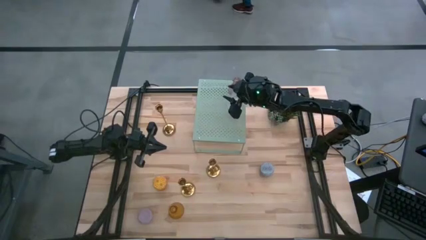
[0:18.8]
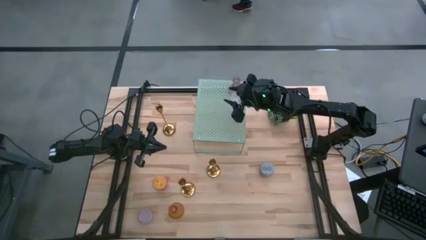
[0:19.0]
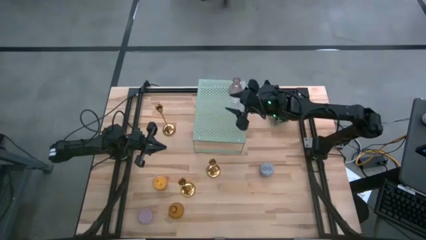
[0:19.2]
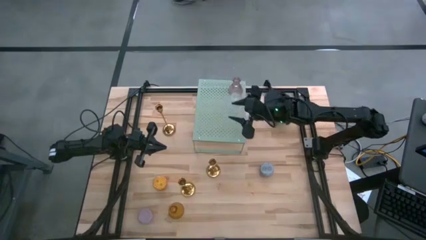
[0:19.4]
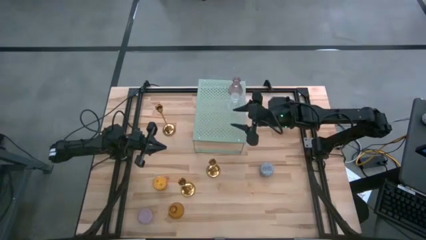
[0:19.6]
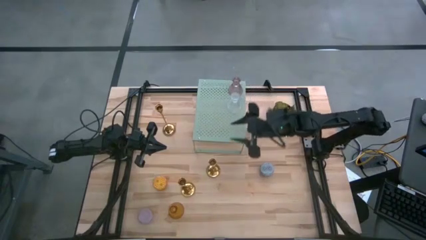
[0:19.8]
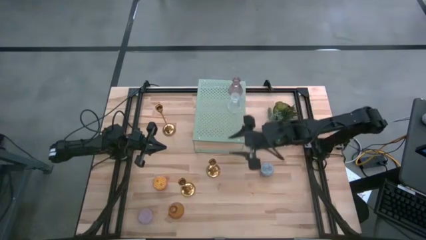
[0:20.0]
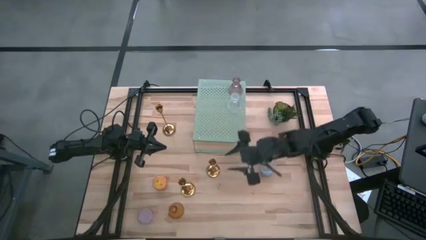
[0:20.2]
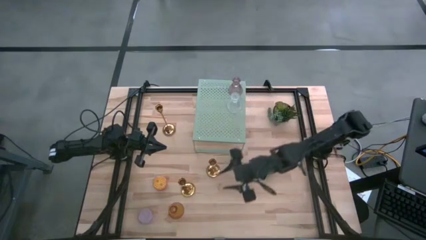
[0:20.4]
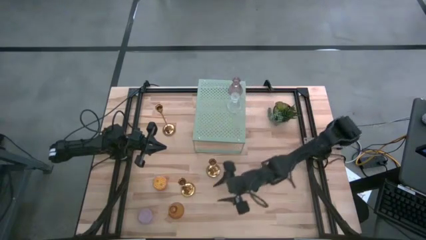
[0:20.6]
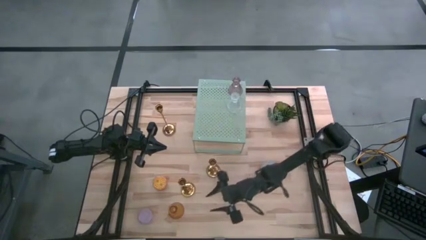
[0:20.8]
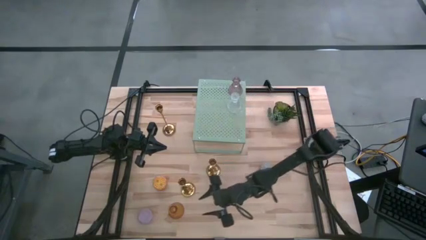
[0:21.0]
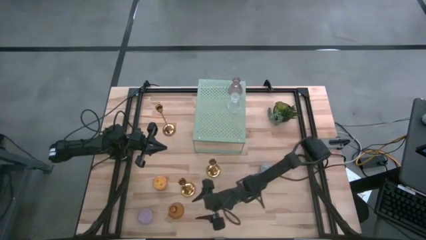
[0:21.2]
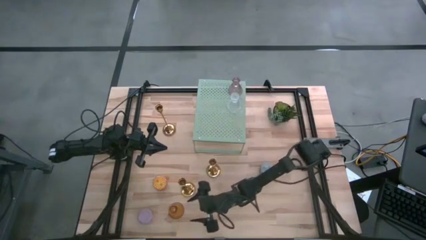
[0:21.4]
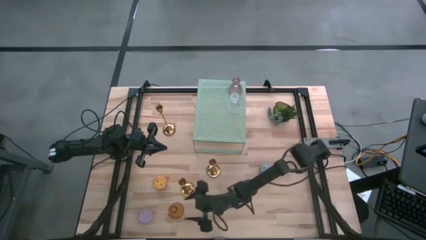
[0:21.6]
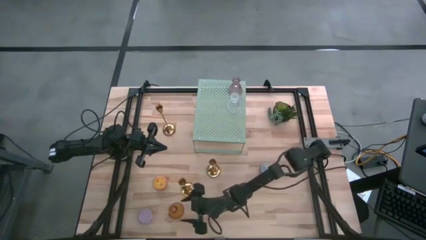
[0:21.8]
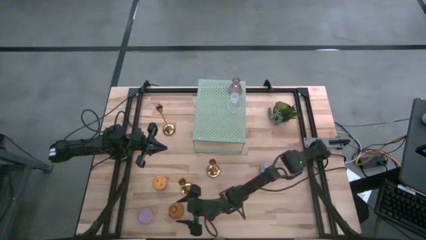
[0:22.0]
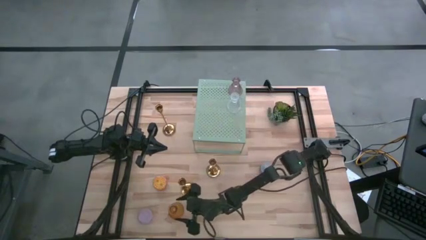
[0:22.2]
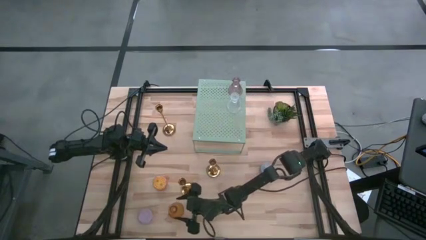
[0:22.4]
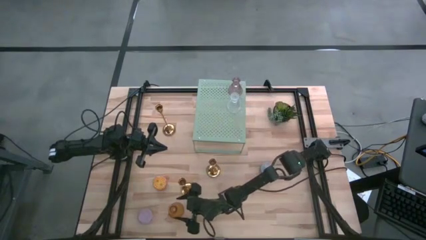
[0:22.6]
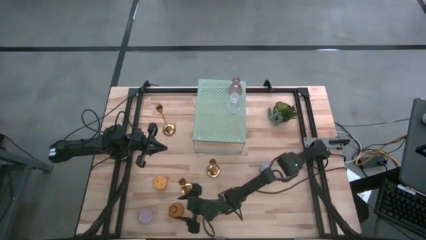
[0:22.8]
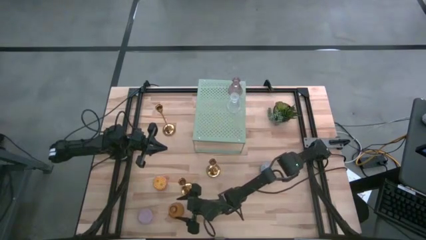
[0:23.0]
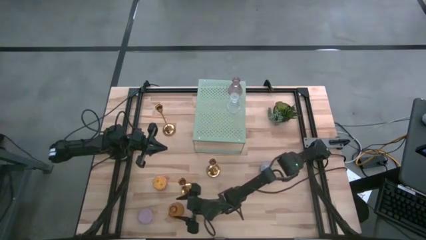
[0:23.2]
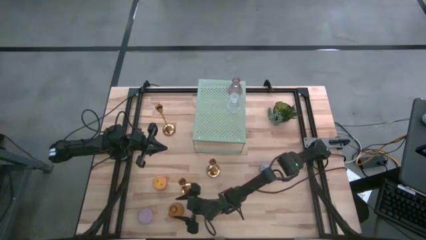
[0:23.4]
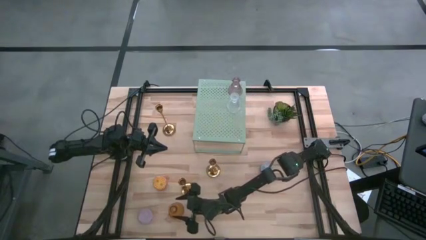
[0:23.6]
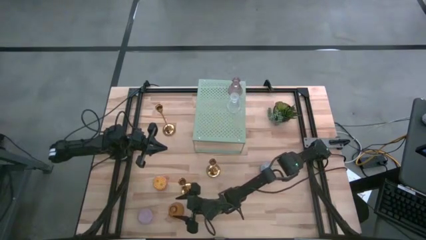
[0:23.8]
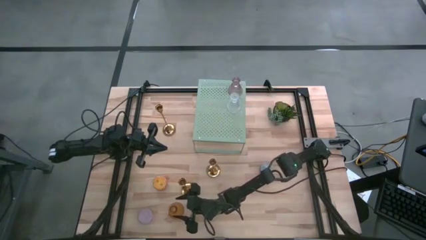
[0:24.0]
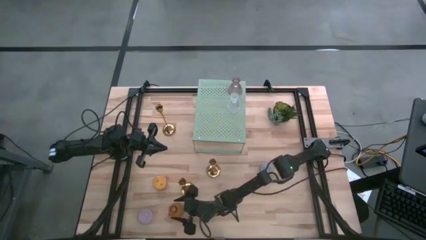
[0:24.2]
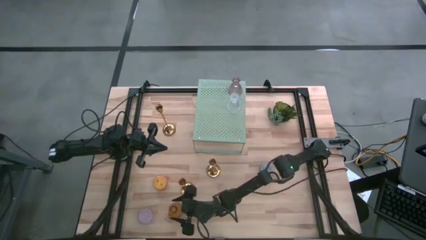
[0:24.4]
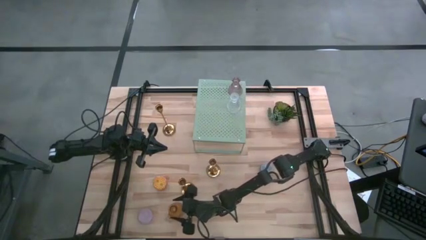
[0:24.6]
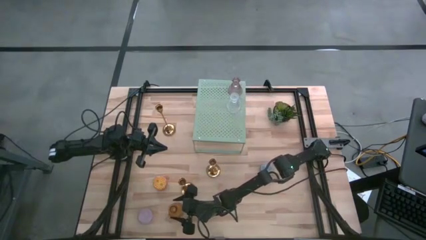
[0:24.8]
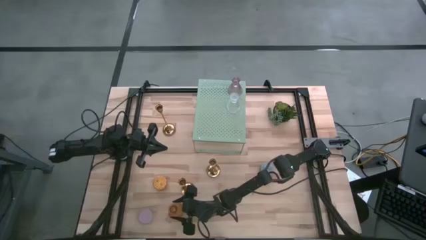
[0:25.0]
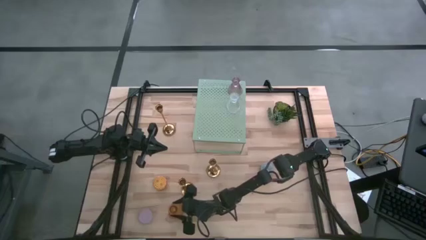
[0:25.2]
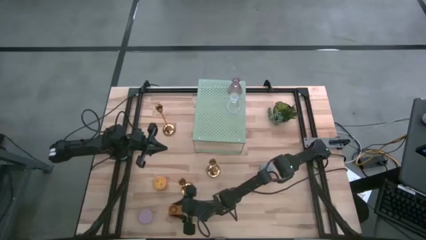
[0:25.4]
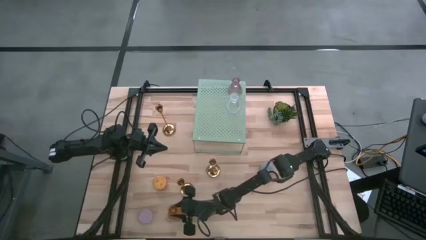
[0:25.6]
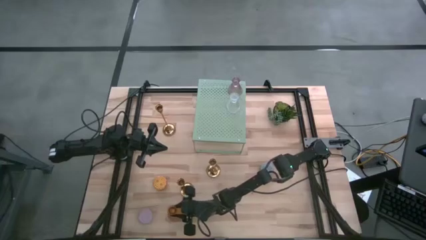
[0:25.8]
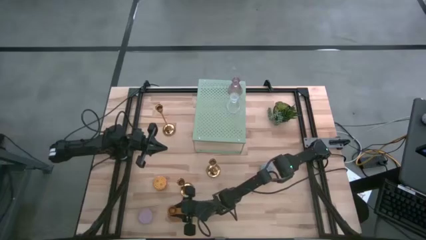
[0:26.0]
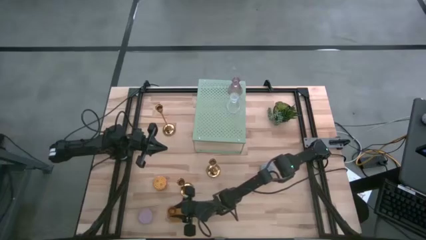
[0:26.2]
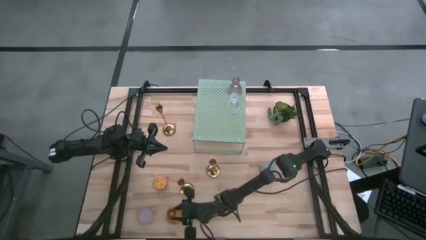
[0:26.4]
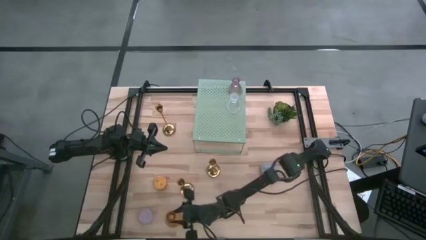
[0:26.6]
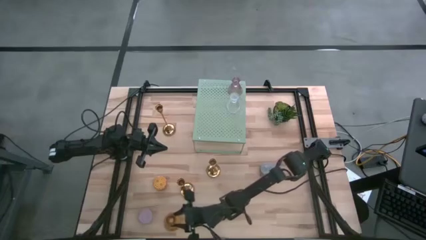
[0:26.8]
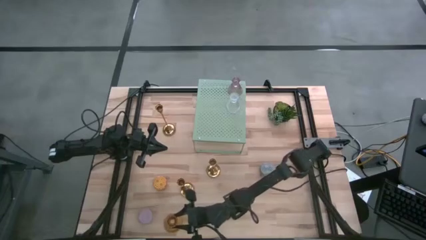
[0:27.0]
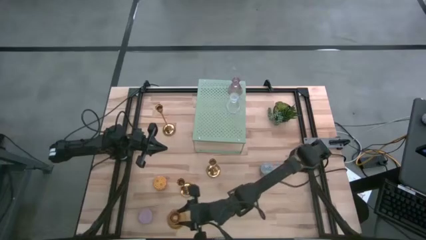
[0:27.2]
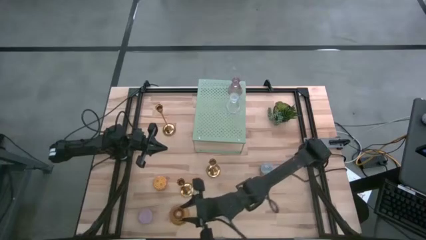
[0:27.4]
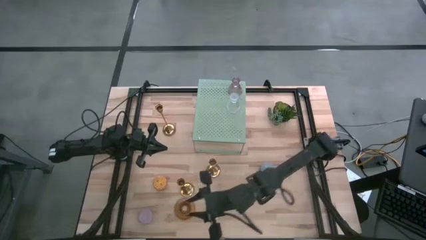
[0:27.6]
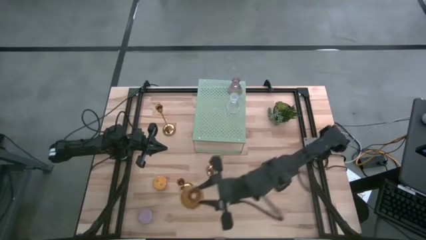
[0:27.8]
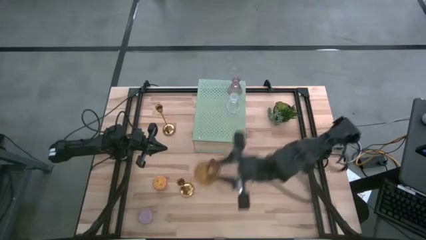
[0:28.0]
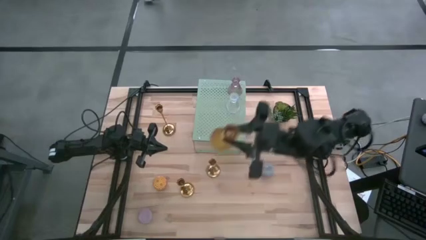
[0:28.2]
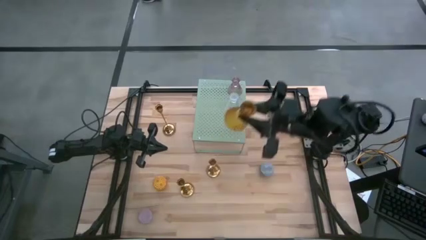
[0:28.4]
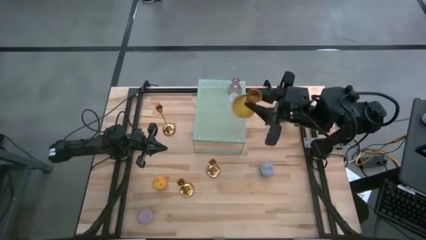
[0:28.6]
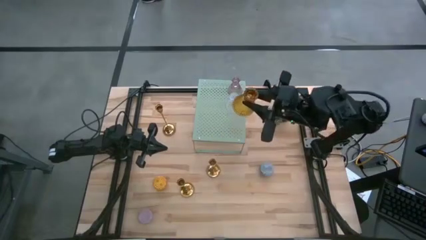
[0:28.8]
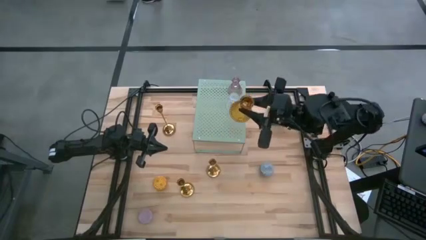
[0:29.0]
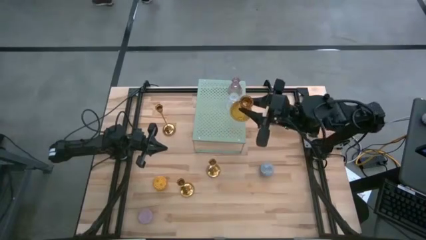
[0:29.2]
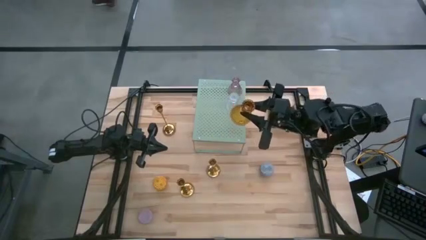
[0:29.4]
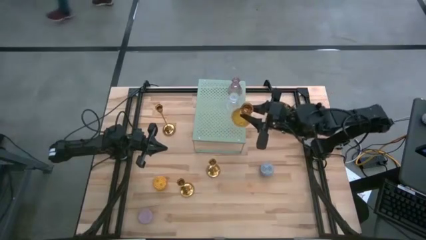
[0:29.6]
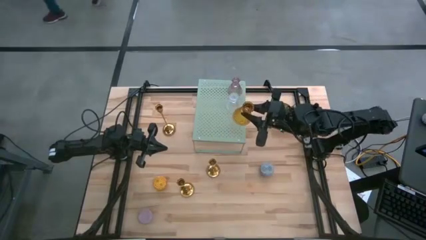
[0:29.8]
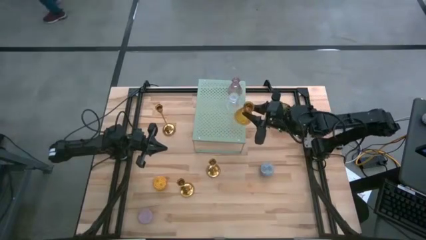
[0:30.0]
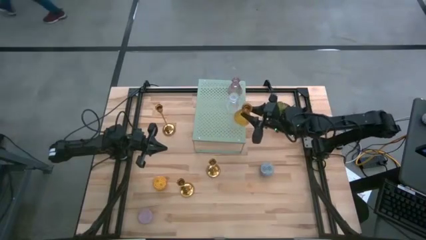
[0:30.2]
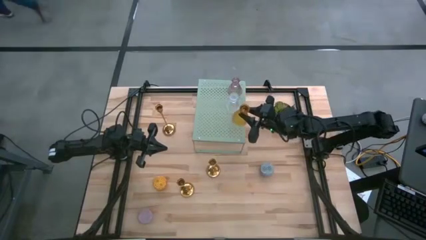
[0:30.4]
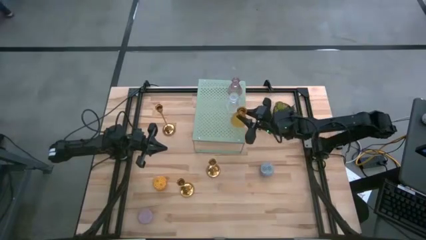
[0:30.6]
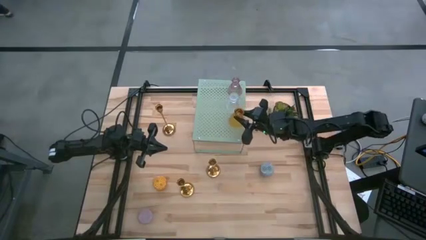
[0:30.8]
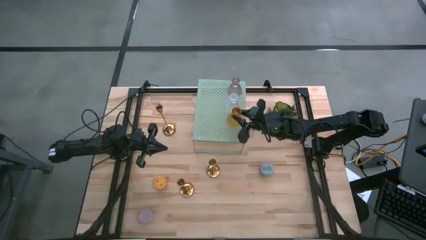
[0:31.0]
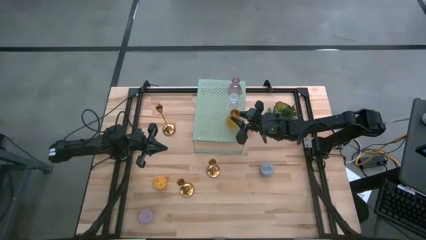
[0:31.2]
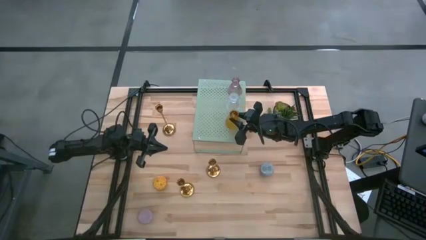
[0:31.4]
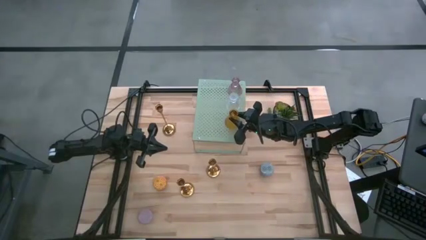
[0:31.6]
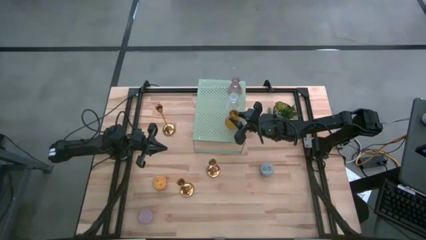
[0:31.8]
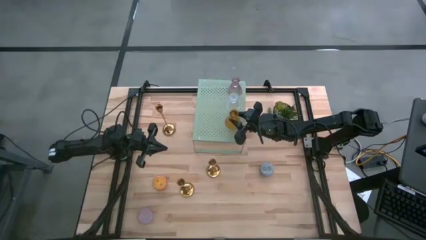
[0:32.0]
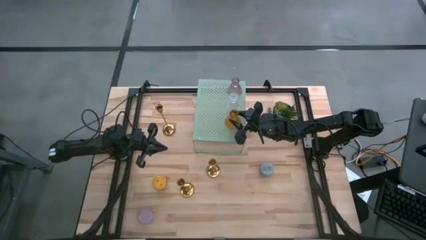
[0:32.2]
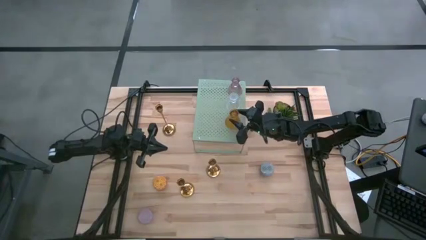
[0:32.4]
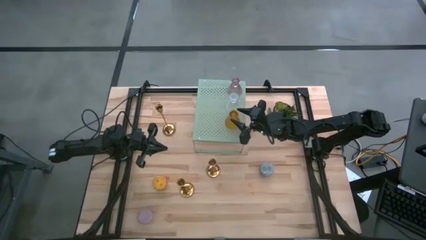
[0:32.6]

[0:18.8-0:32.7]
Task: Stock candles on shelf
Put the yellow candle vase and aligned it with the other transparent candle vase on the shelf
